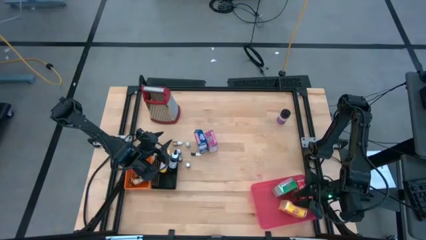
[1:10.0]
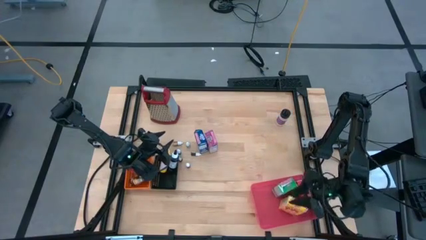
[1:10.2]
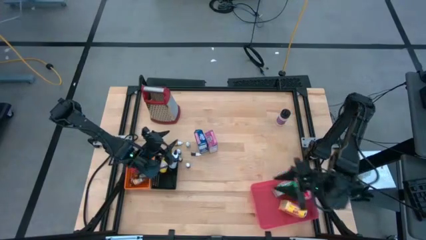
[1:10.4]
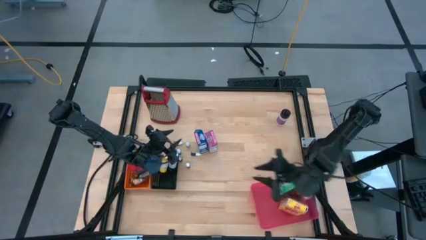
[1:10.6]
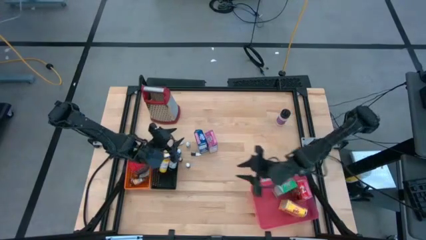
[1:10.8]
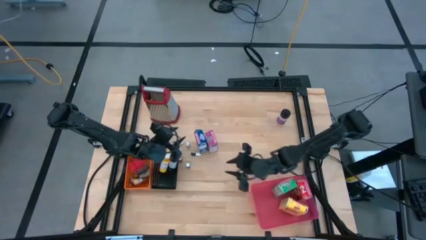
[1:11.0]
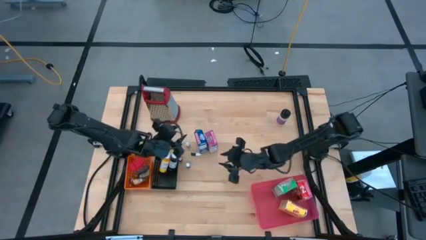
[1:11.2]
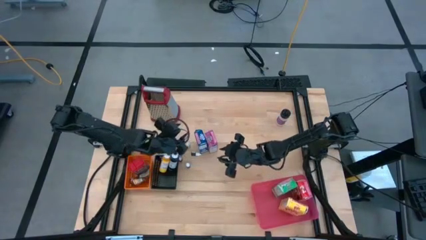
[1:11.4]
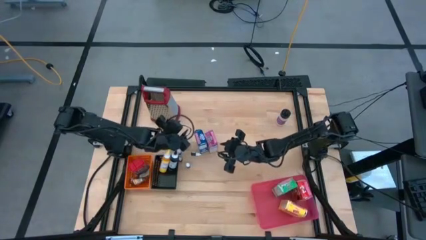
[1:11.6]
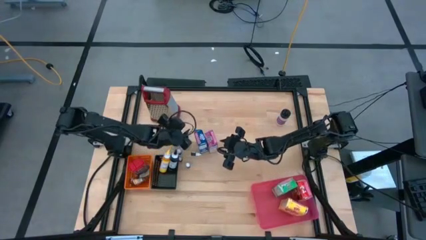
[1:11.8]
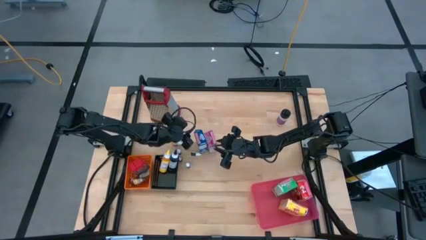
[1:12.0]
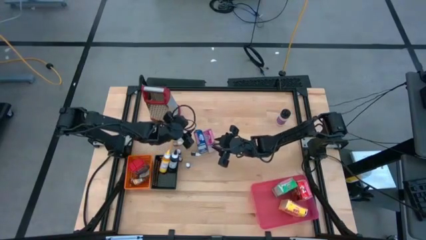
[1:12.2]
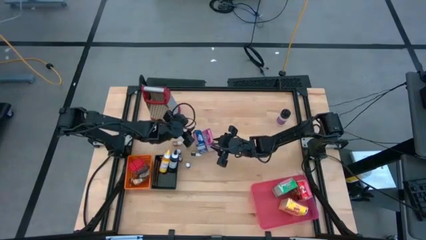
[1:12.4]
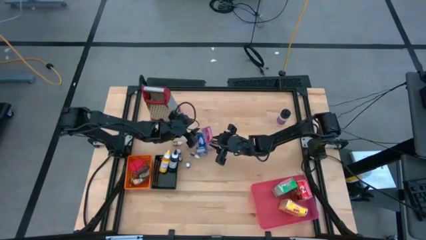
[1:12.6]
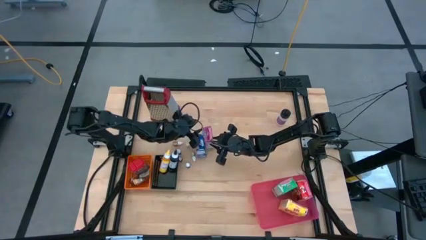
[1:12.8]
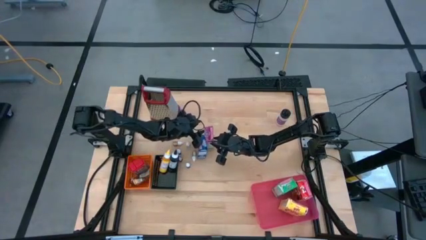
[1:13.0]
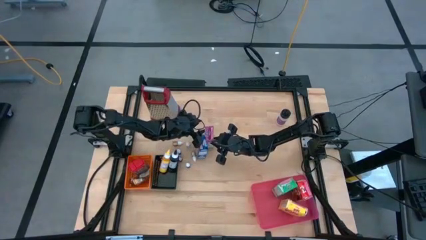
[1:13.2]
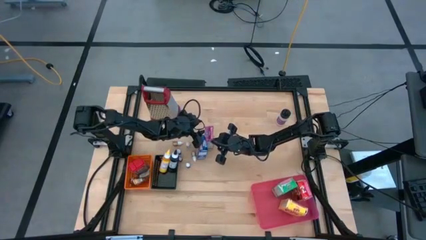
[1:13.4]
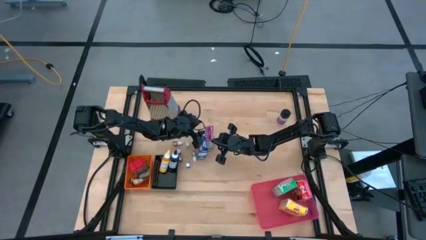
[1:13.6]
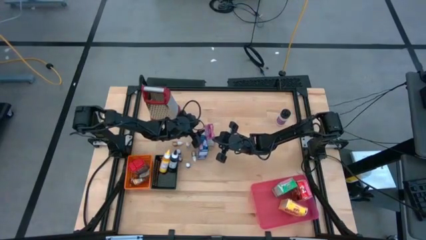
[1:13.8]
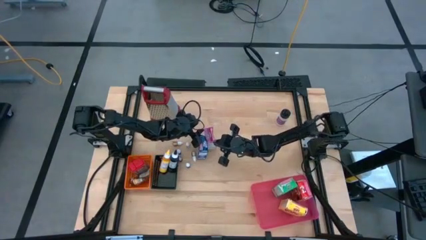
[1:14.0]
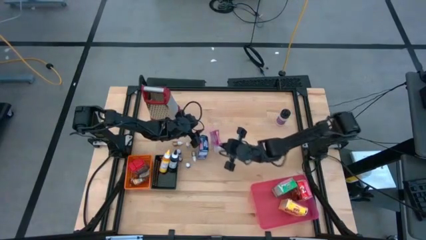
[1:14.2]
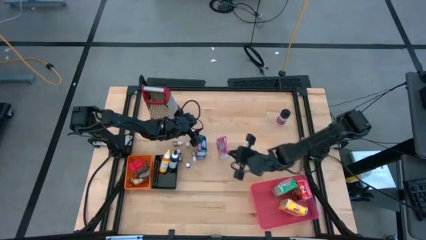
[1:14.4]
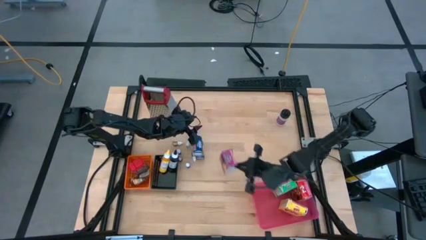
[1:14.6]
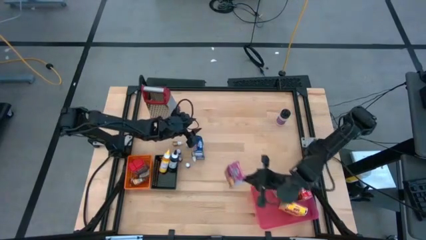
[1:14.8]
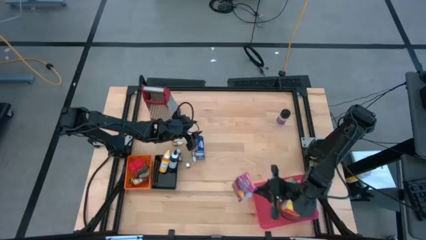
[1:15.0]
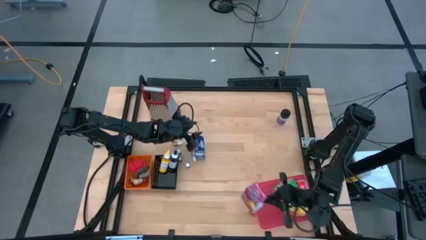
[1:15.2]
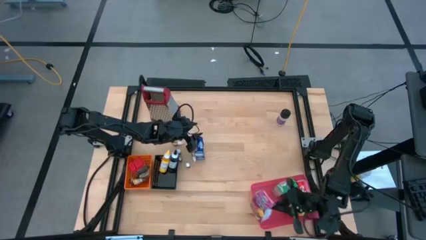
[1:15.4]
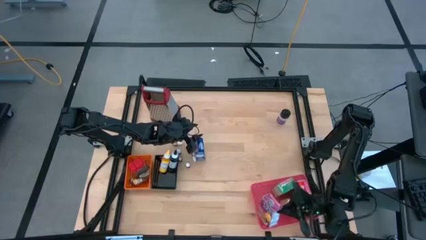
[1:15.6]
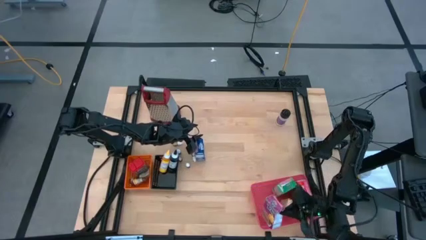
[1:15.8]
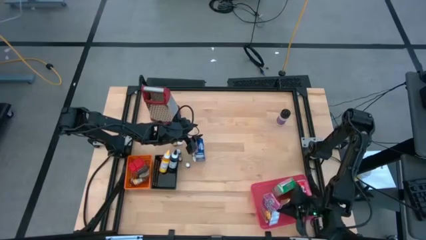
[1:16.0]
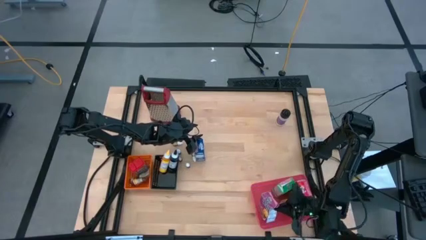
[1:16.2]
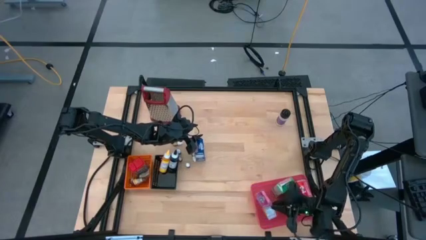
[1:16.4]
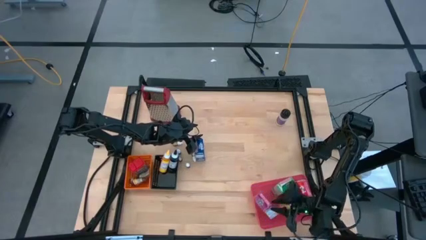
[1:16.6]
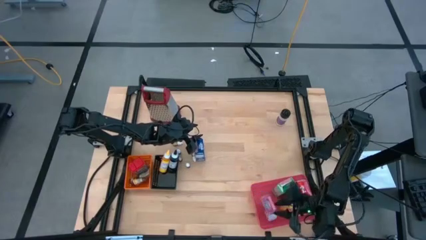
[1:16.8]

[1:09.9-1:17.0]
Task: Pick & Place Kitchen Items
Put the purple cereal box into the red bin

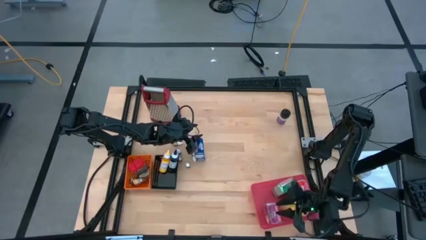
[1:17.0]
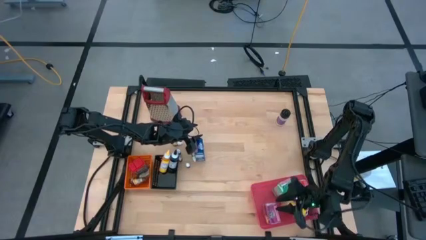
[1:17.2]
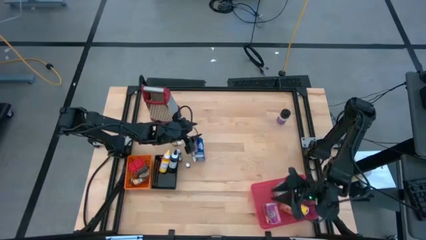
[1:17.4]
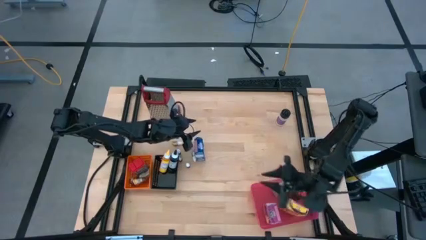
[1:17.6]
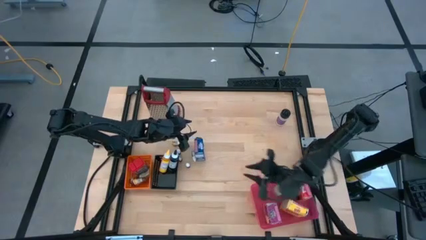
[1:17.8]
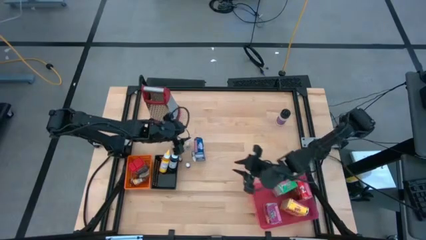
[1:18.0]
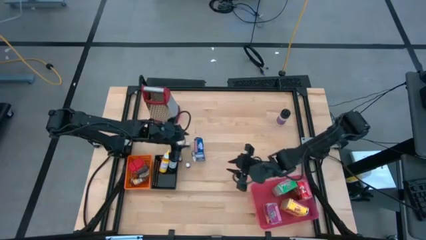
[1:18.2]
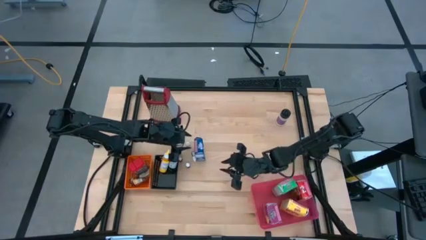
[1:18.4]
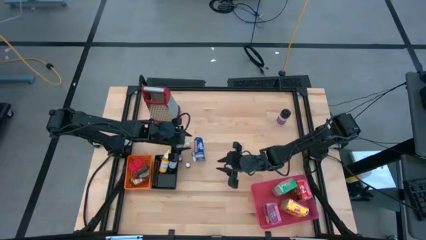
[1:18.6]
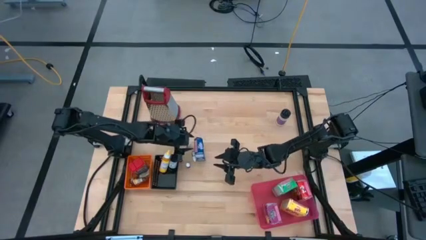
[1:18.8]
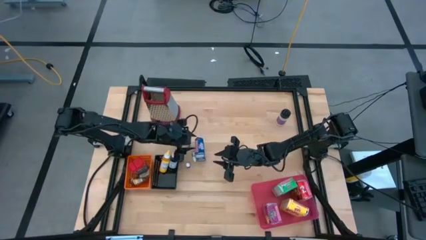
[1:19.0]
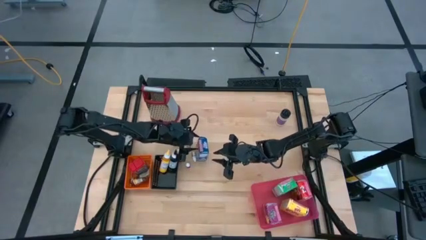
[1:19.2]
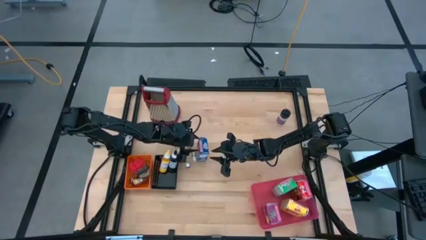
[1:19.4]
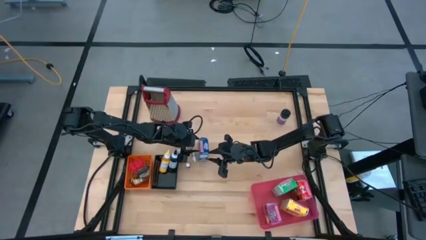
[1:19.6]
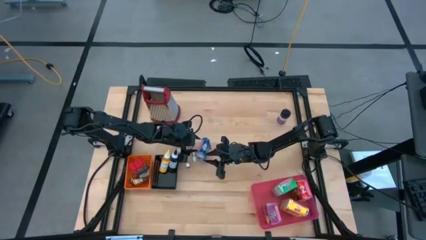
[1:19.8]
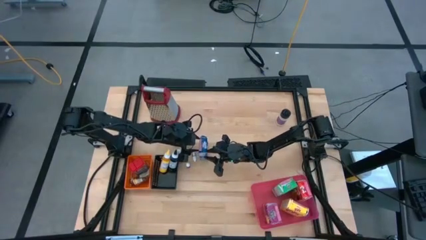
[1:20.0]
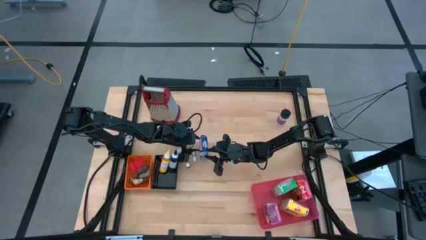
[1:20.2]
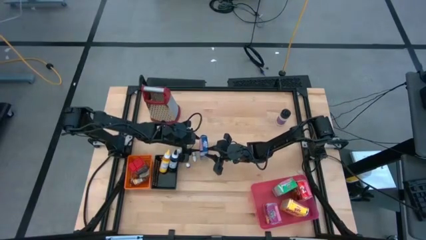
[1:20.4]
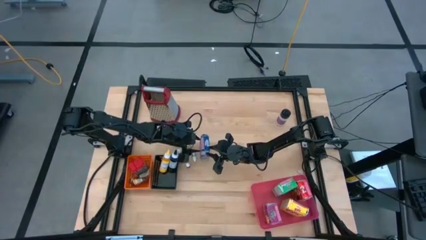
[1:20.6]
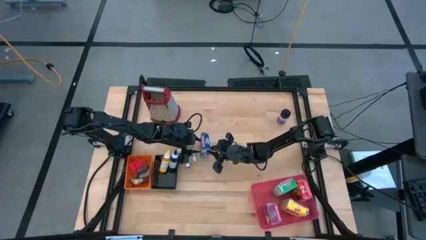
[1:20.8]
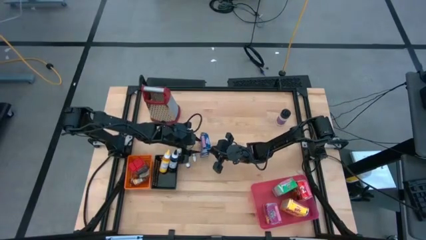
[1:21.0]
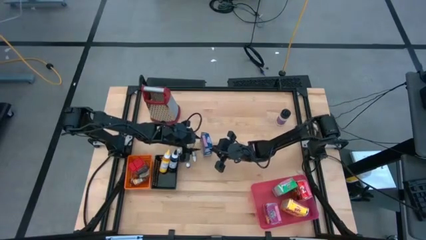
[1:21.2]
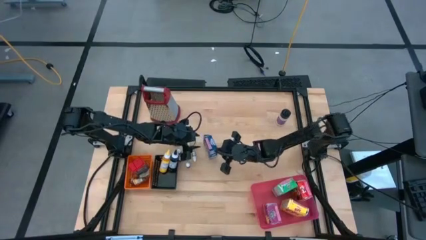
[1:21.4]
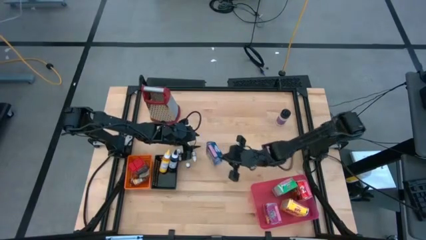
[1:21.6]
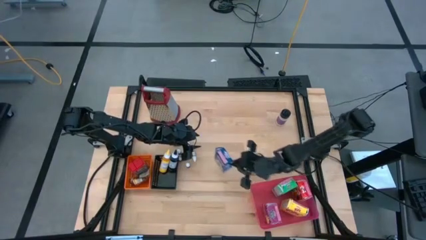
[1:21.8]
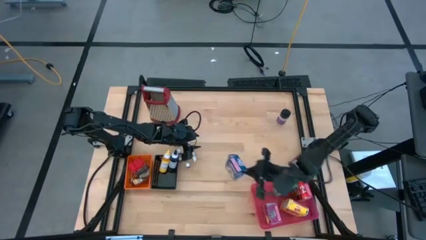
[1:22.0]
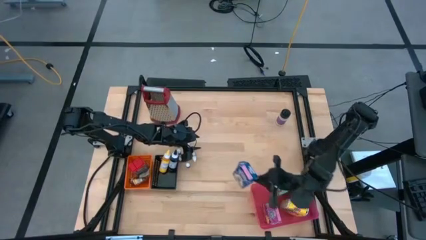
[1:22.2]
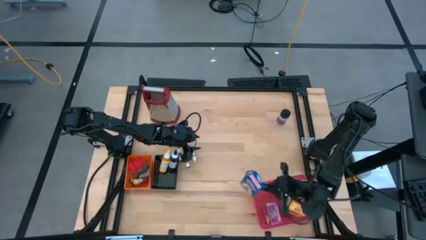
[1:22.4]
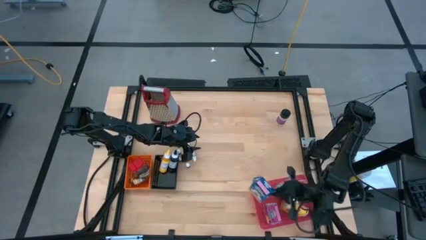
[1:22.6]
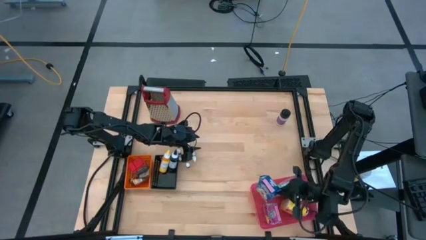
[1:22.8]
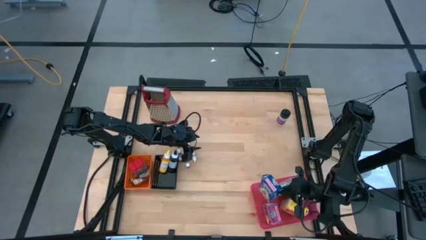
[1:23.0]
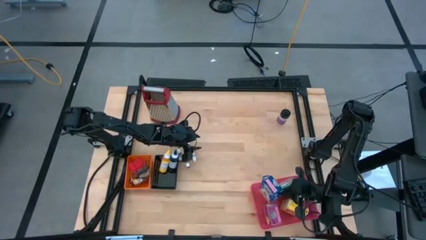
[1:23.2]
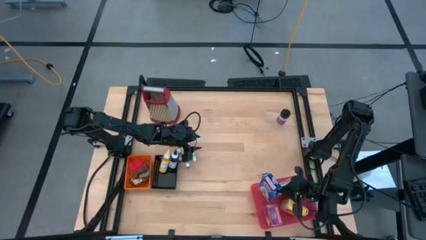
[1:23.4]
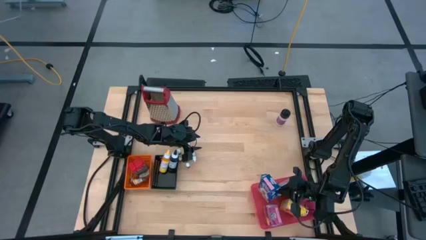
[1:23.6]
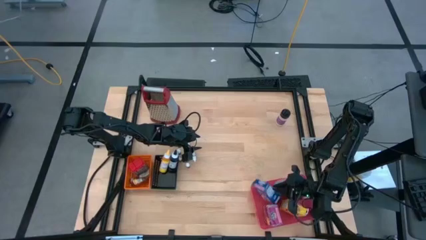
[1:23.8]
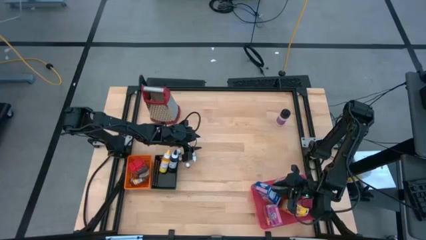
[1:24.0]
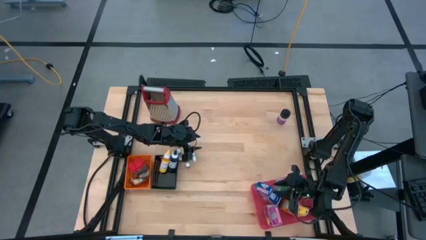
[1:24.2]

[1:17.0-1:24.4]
Put the blue cereal box into the red bin

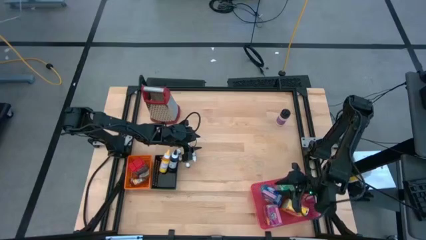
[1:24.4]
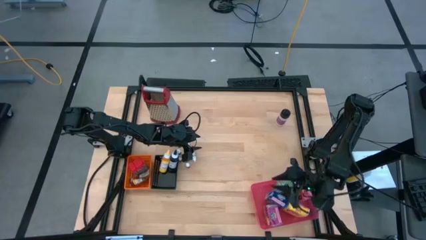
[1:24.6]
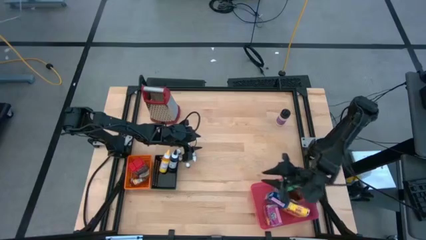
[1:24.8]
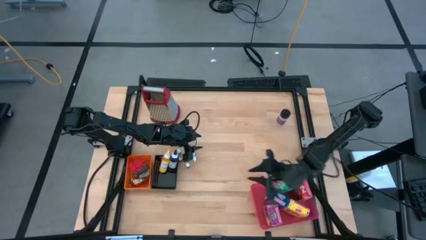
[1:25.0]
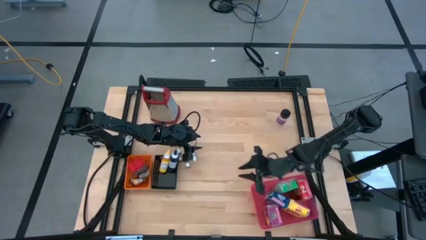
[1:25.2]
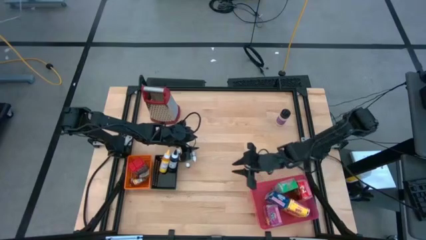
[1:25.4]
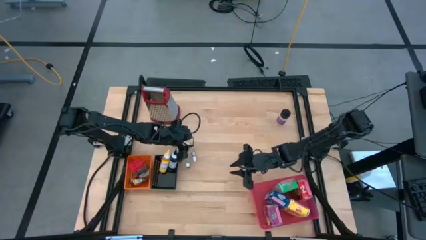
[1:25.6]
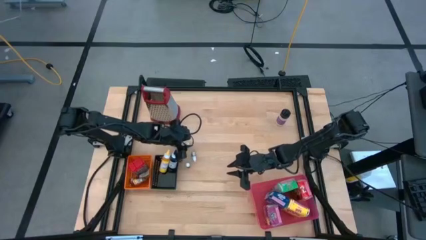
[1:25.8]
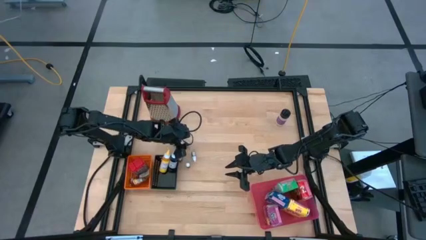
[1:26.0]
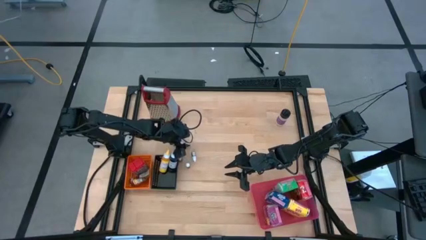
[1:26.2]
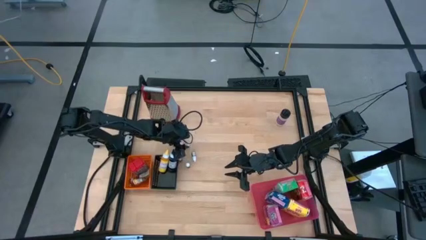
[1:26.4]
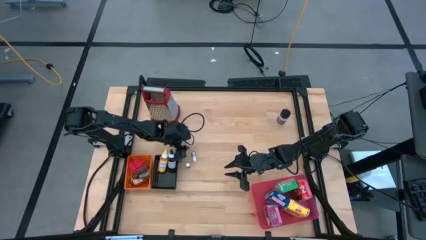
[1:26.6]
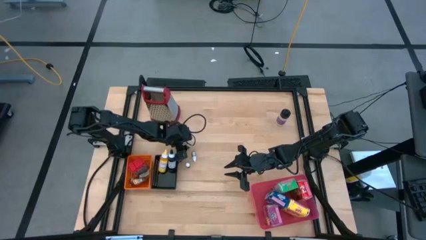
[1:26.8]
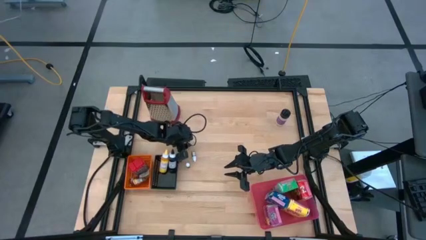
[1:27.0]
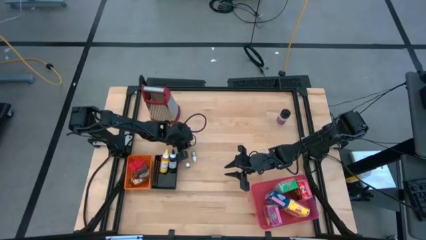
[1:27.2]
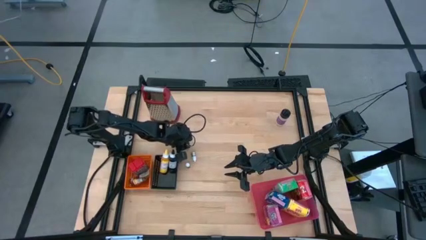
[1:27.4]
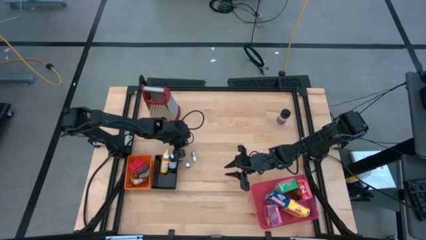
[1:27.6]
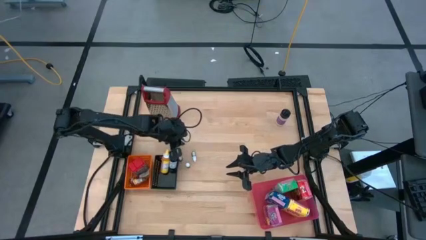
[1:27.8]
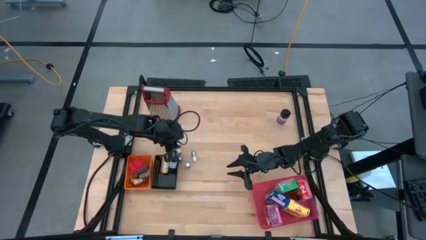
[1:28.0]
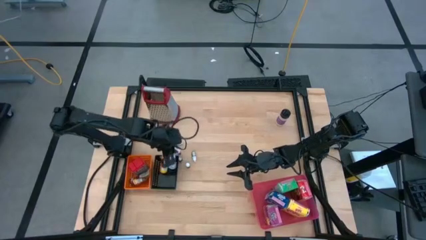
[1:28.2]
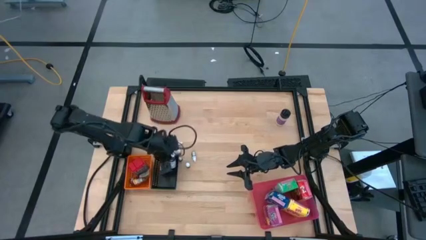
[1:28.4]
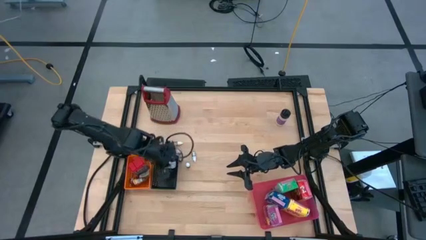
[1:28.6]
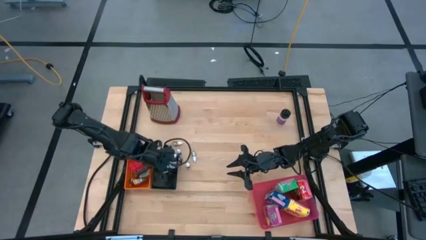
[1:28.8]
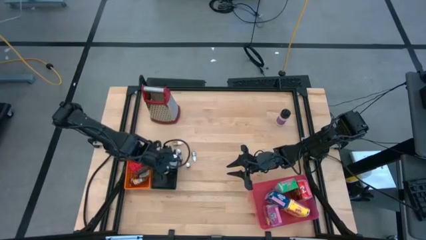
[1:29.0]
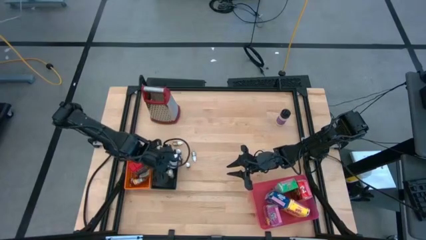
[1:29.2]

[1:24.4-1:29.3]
Put the green food coloring bottle into the black bin
